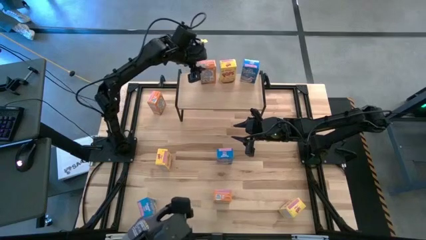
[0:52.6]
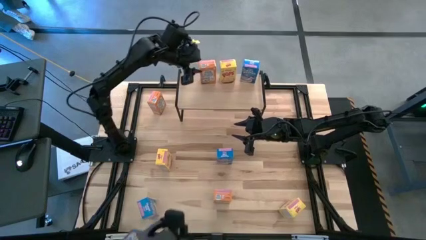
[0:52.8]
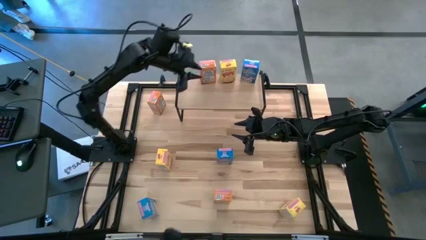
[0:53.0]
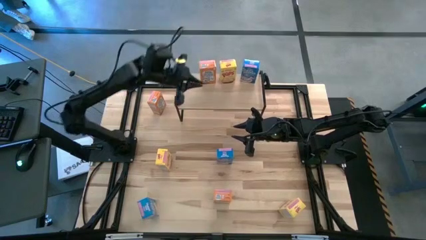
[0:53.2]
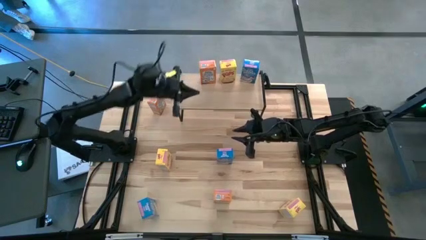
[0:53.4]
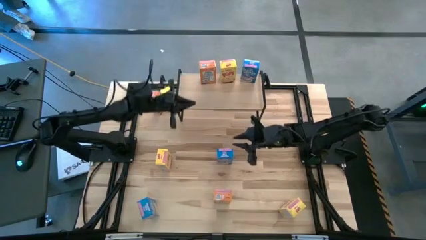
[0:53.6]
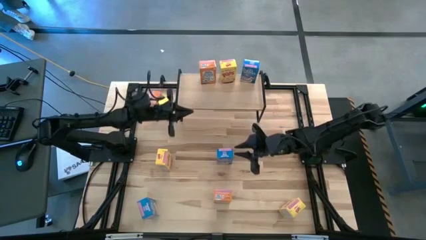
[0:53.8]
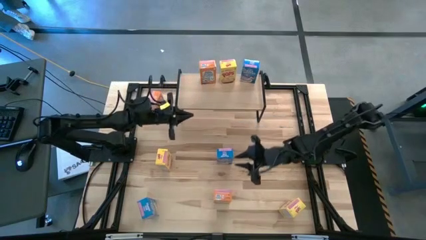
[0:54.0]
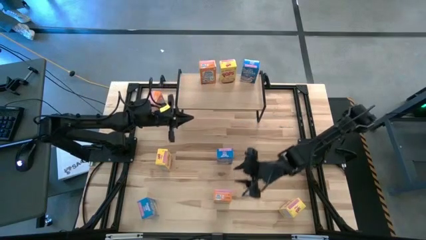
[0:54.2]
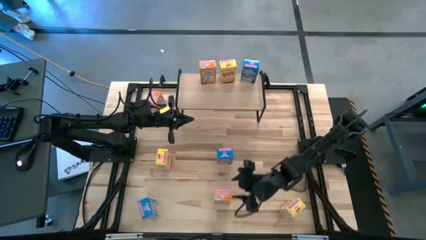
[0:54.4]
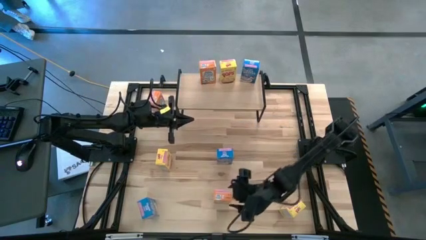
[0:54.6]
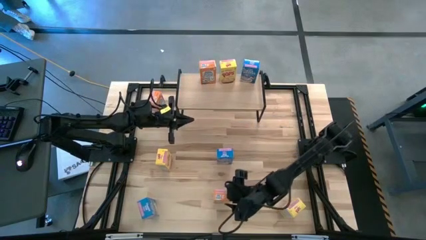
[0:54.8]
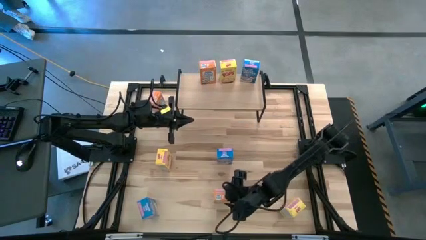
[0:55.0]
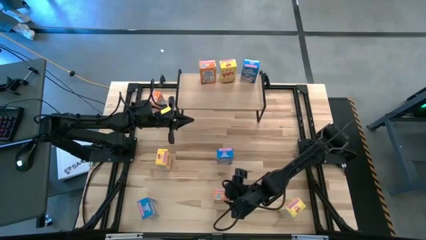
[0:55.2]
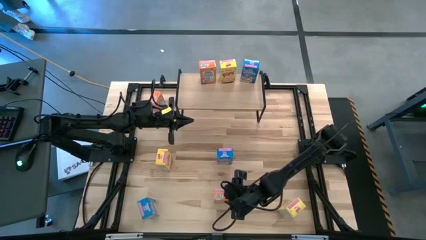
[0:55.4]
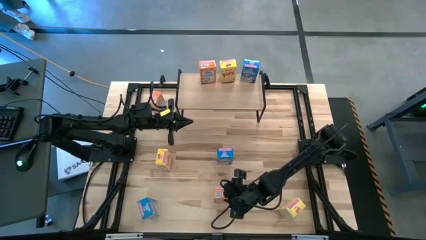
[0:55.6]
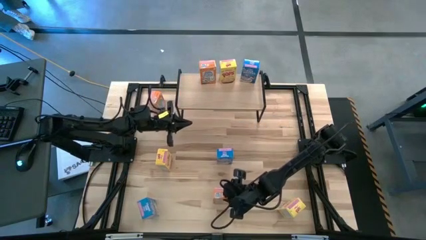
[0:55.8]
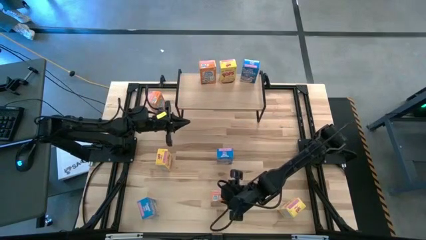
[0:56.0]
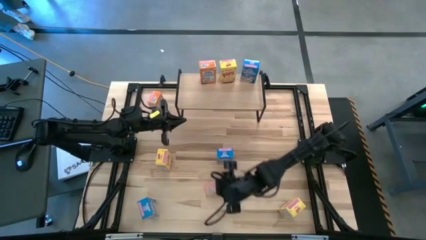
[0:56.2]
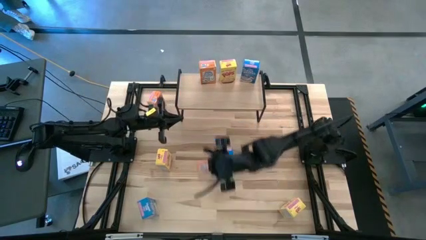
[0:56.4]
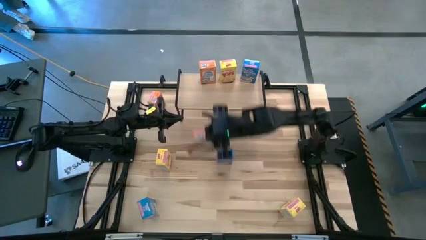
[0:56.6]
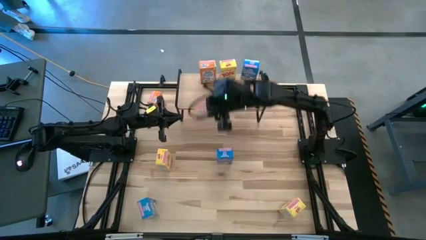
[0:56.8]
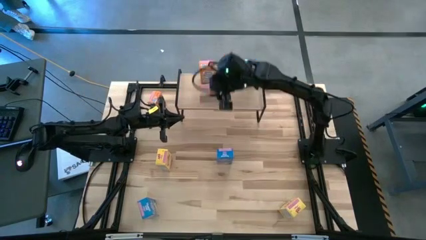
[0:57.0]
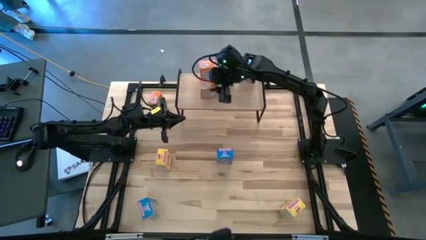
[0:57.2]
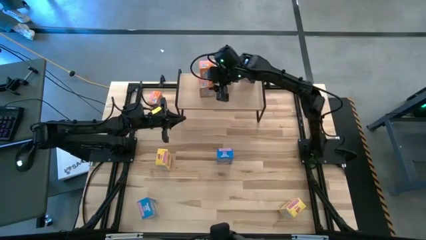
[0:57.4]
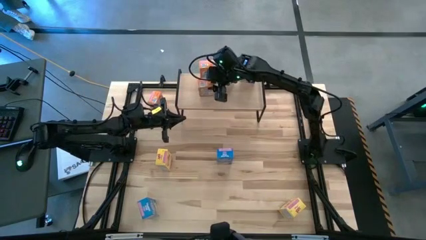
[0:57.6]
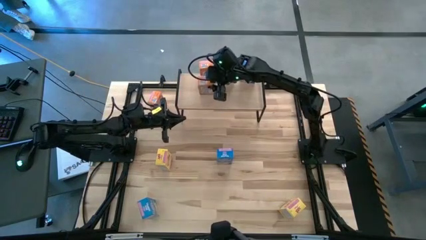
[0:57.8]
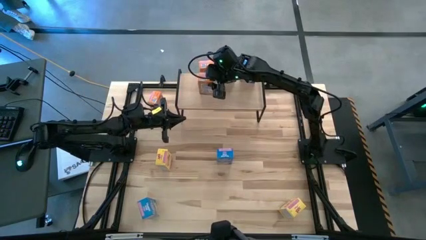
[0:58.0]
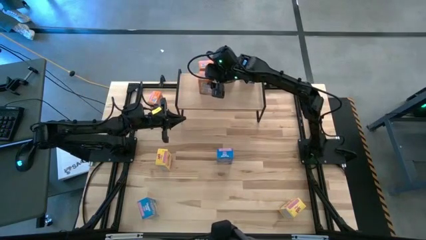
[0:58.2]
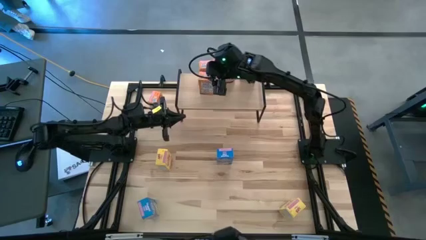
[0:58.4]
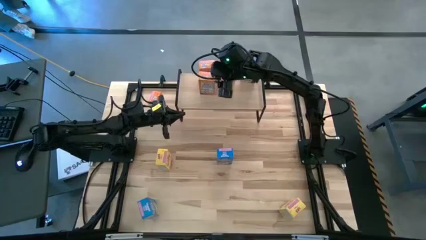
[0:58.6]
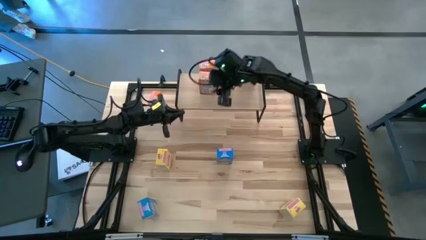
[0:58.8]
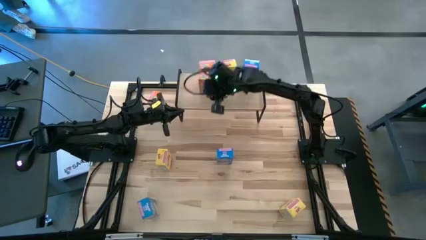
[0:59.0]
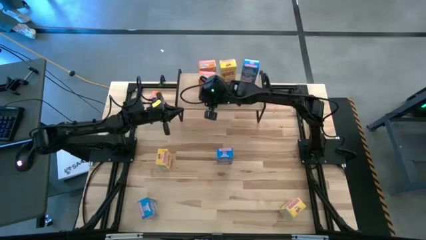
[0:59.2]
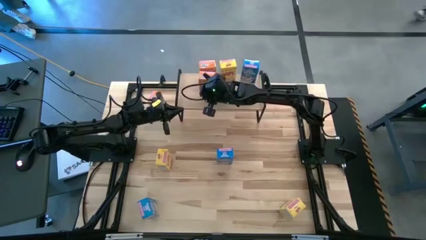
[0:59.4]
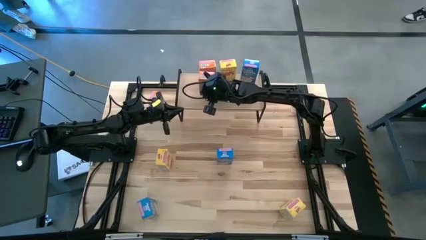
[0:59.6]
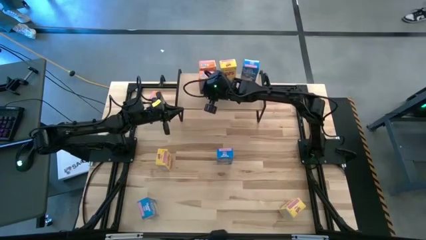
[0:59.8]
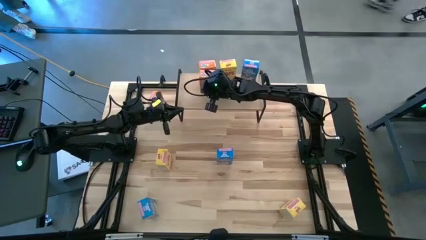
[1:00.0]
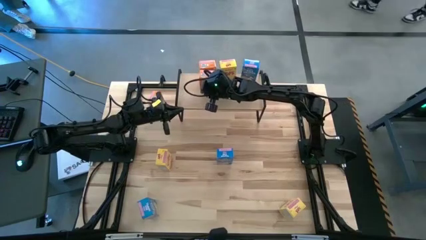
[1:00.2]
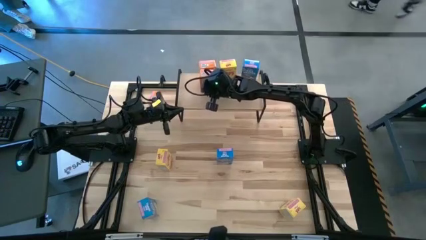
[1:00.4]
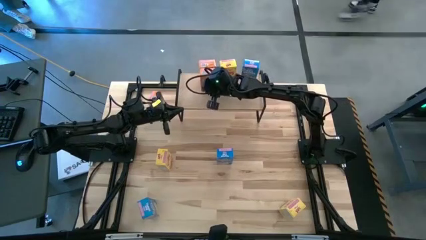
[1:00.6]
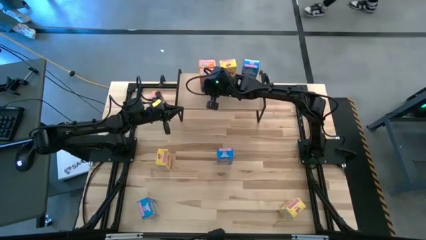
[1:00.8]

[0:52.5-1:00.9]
Task: Stack cereal on shelf
Put the bottom orange cereal box on the shelf aligned with the other orange cereal box

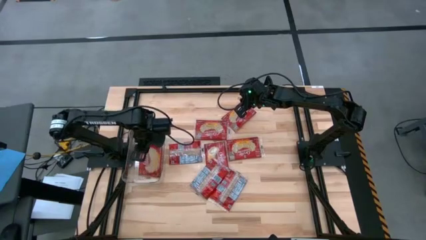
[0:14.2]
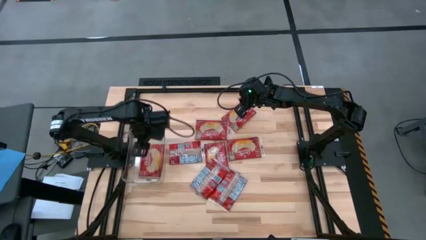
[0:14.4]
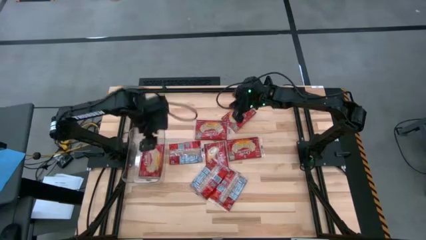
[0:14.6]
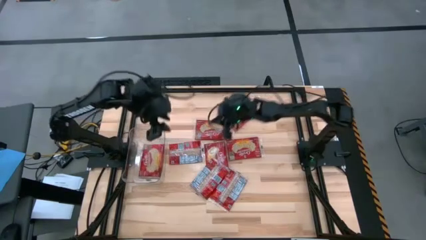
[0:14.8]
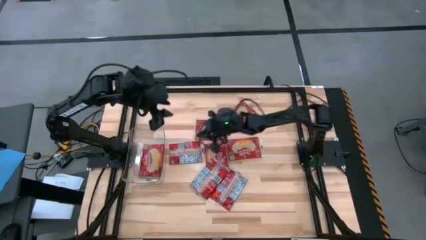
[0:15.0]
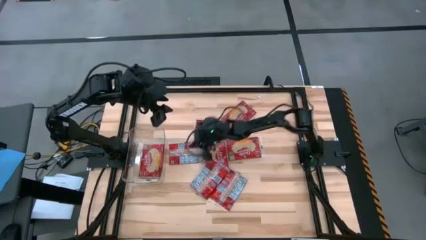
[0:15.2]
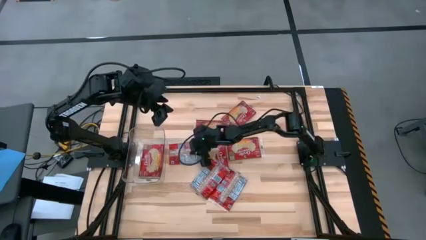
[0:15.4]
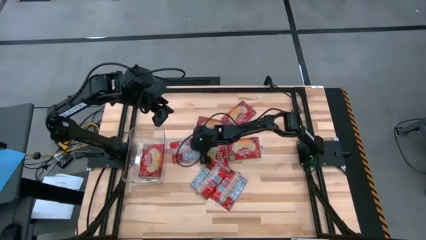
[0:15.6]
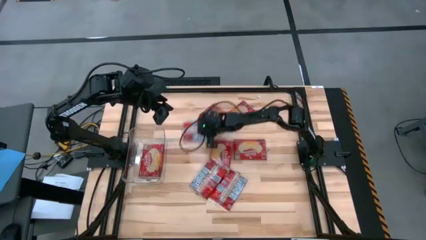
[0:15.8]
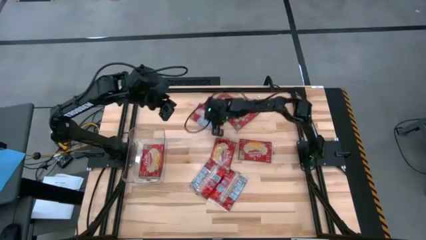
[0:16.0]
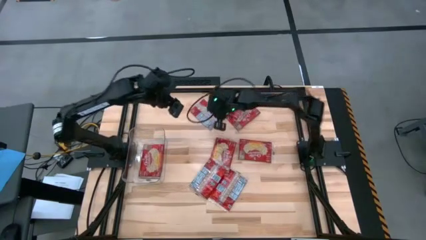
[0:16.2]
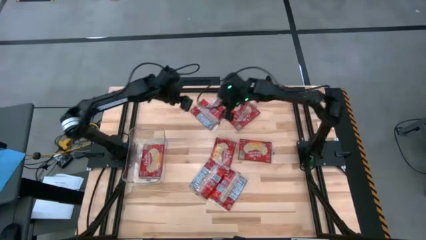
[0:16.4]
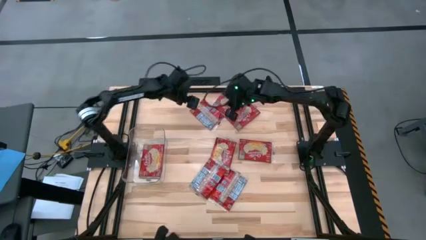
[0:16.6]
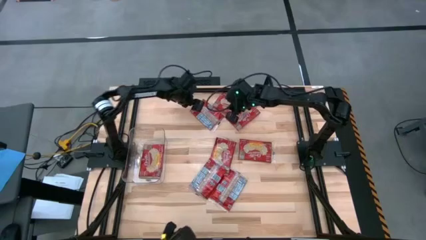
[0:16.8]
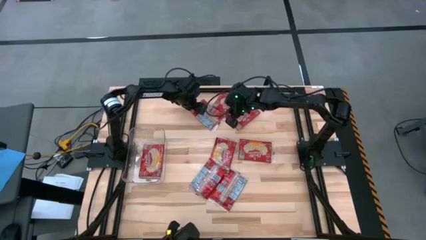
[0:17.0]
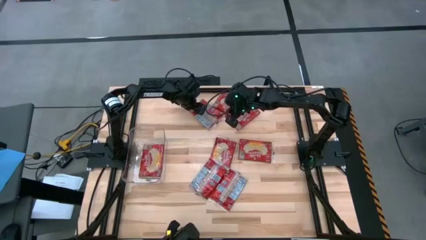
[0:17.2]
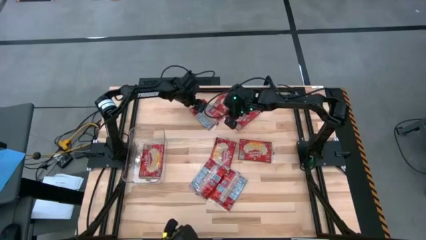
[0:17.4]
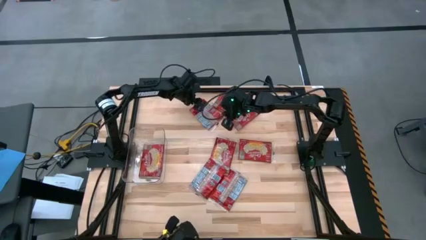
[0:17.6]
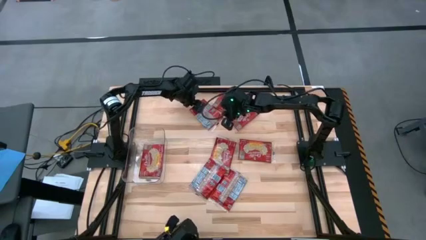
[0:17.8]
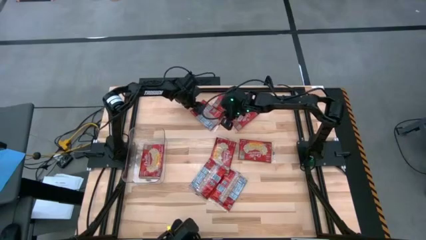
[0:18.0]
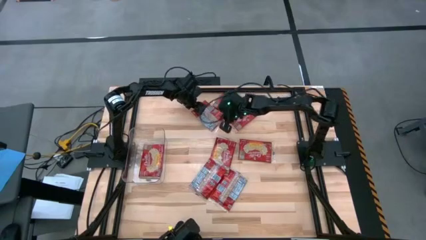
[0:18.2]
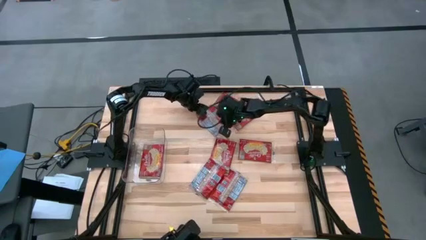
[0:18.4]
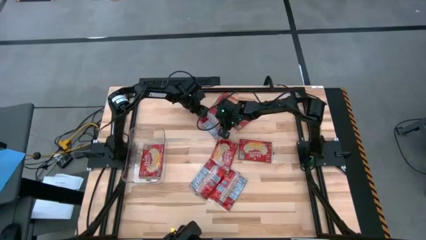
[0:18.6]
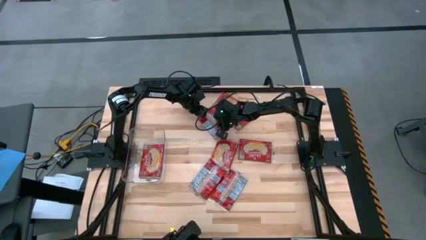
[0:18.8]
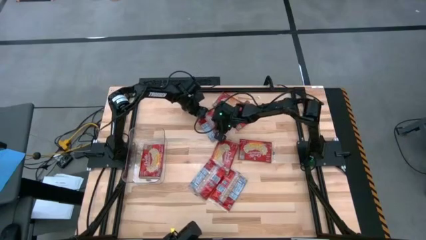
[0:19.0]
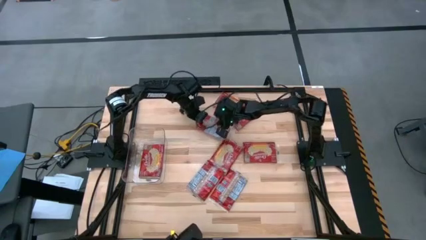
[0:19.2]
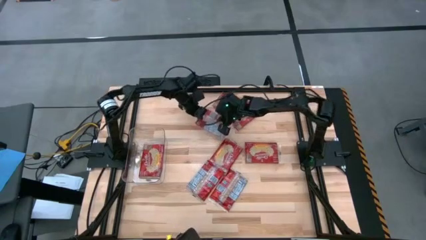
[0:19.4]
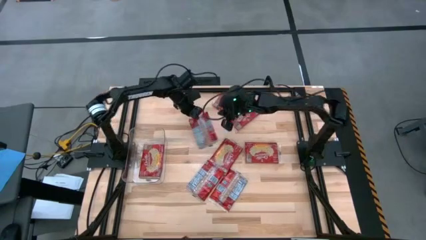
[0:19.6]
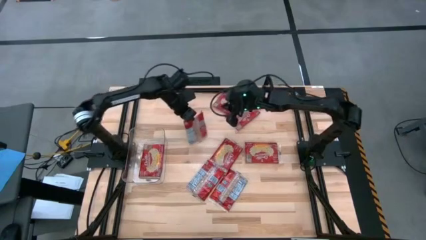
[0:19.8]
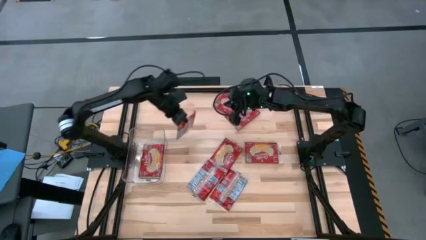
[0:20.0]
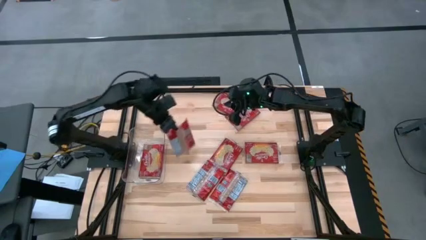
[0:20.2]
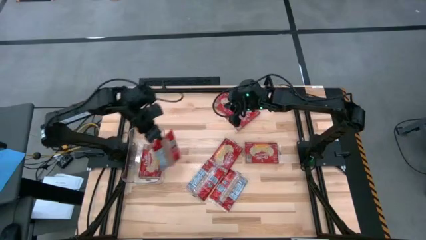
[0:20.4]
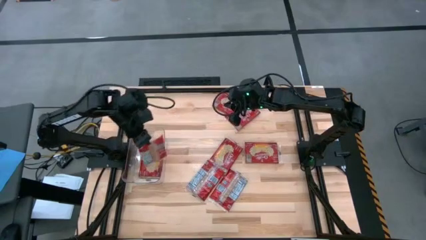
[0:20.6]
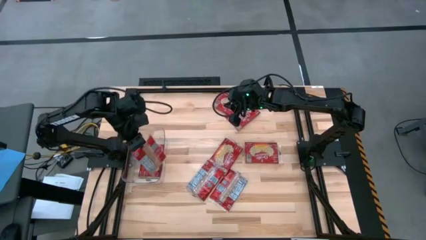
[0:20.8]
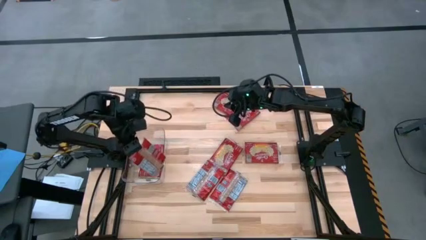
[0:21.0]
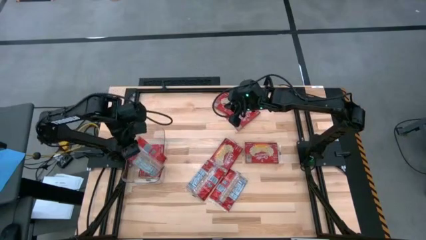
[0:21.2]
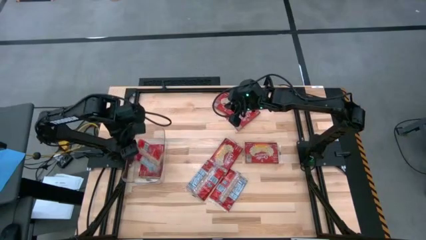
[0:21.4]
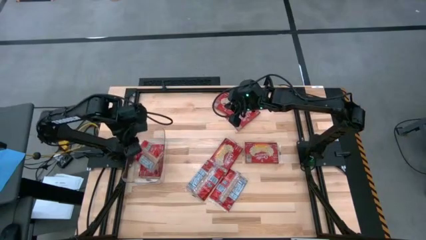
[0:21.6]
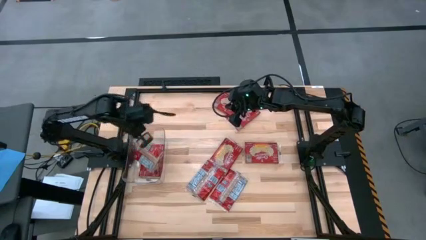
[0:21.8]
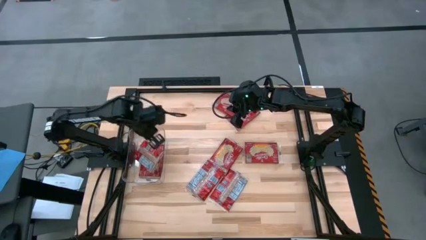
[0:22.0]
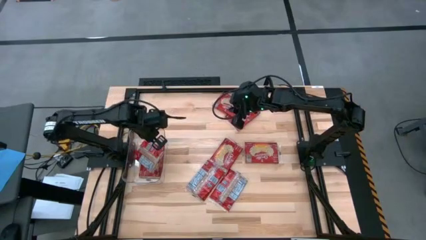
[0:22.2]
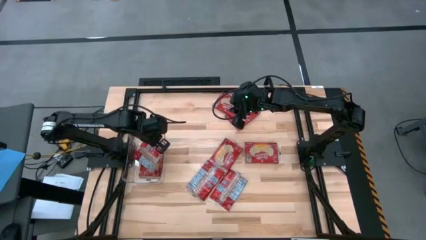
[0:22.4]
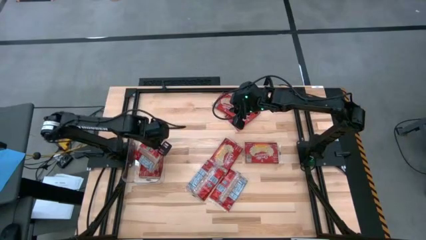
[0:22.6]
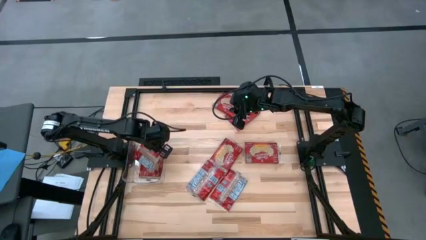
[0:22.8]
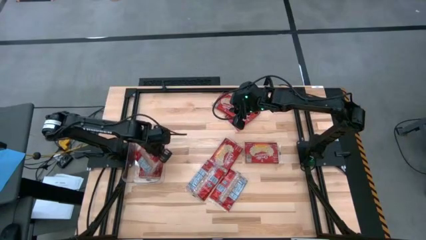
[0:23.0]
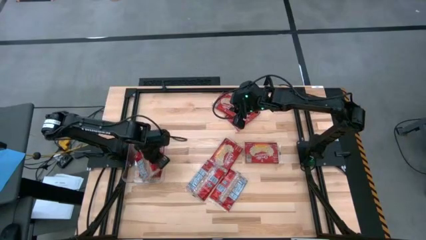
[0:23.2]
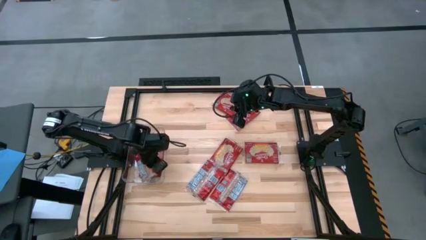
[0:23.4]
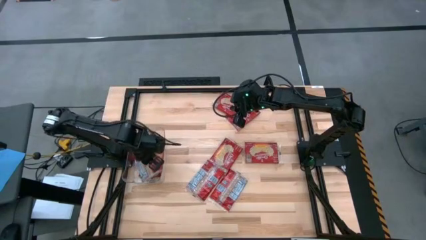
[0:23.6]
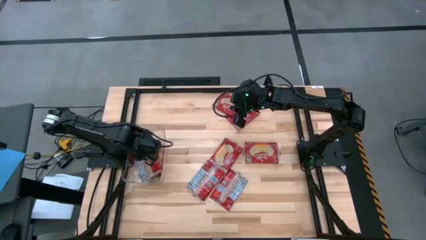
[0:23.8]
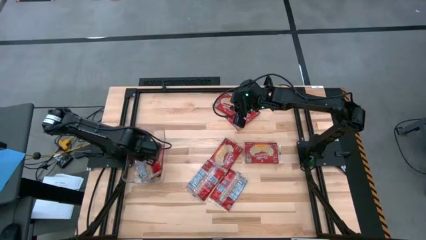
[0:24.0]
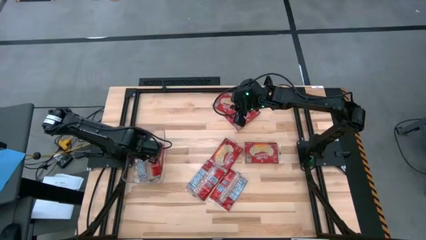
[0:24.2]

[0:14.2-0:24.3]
Task: Sort popcorn bags into baskets
Put the red popcorn bag into the transparent bin
